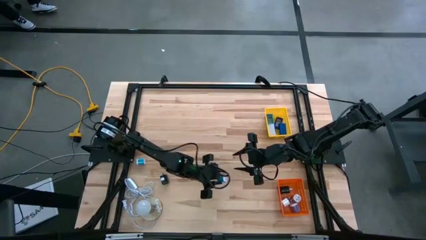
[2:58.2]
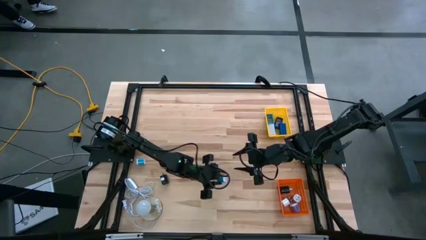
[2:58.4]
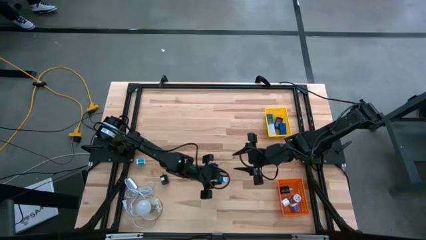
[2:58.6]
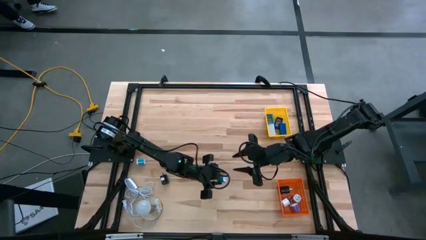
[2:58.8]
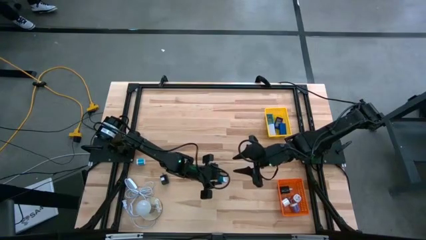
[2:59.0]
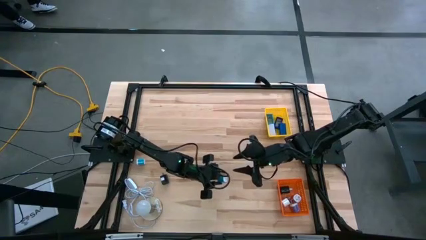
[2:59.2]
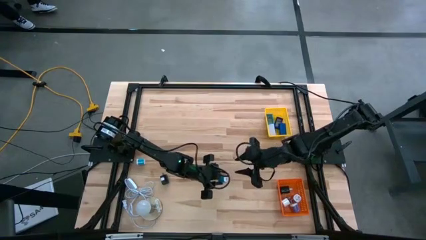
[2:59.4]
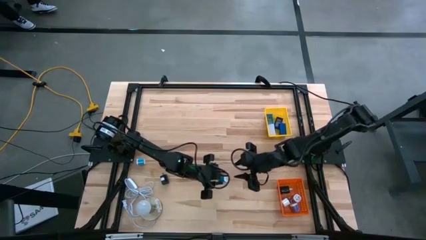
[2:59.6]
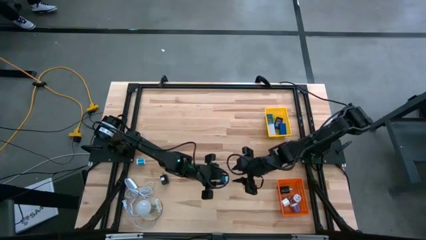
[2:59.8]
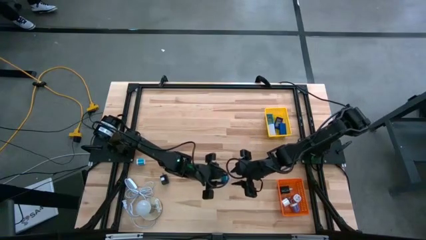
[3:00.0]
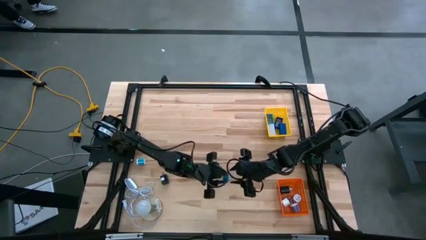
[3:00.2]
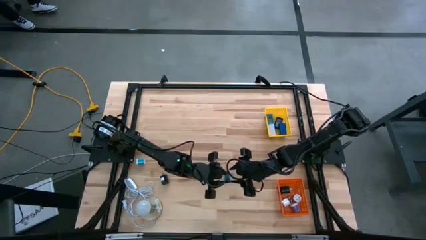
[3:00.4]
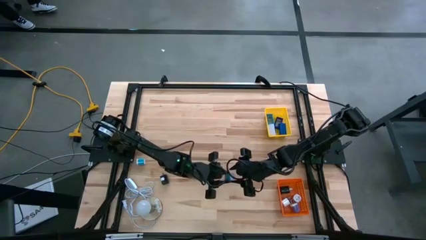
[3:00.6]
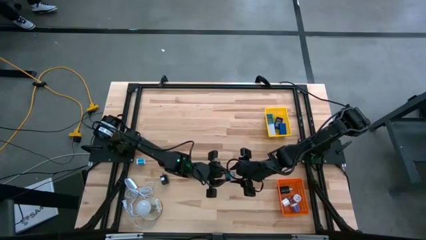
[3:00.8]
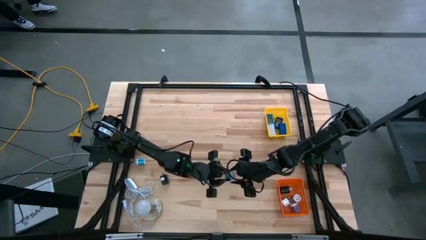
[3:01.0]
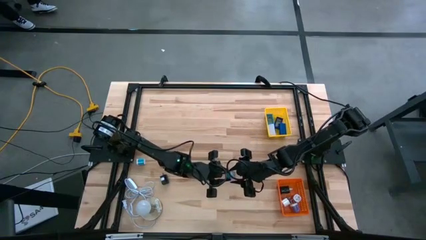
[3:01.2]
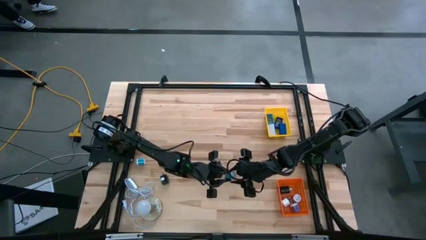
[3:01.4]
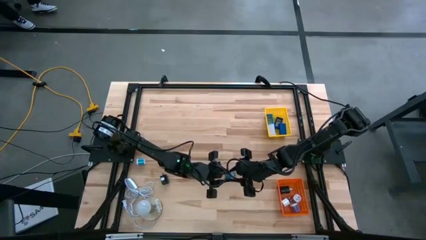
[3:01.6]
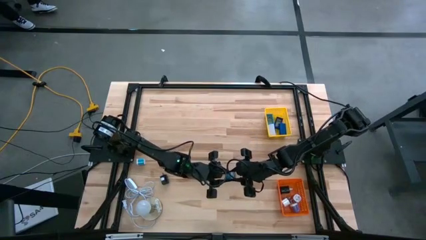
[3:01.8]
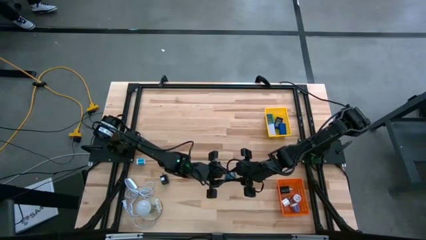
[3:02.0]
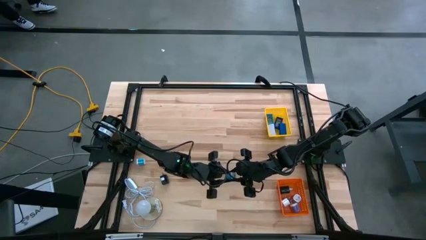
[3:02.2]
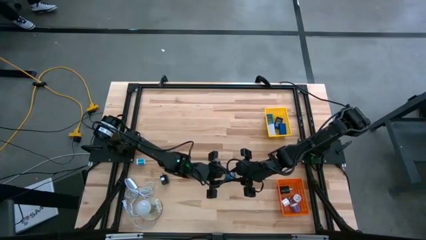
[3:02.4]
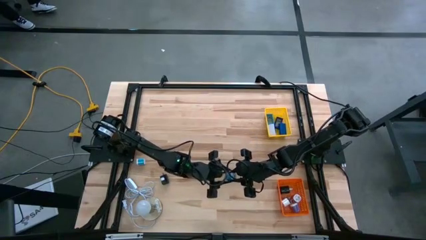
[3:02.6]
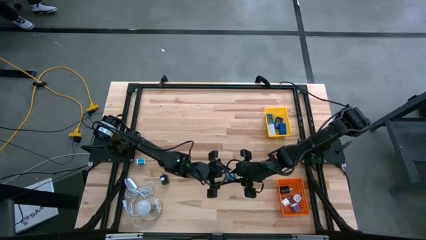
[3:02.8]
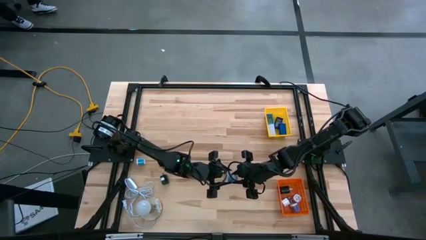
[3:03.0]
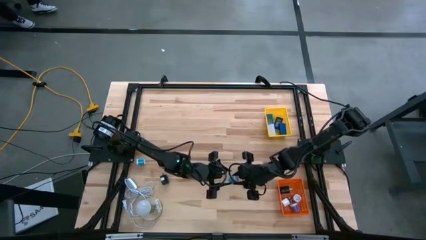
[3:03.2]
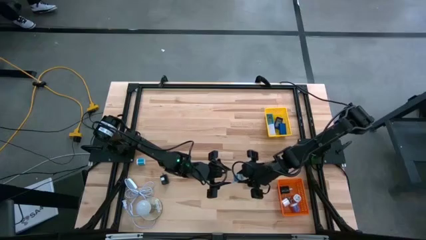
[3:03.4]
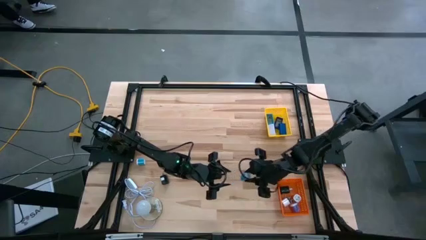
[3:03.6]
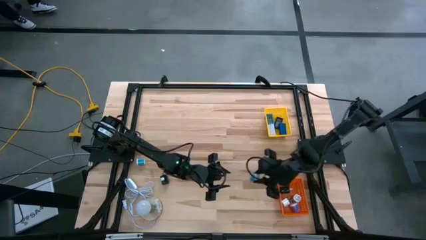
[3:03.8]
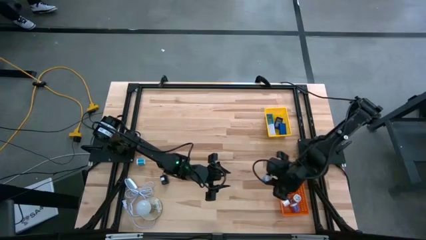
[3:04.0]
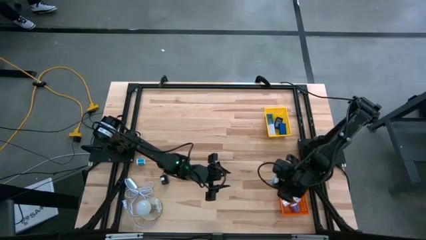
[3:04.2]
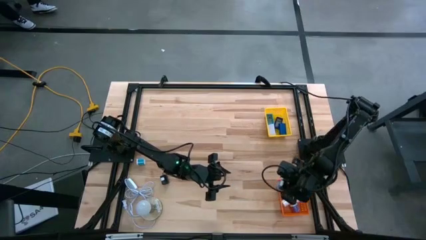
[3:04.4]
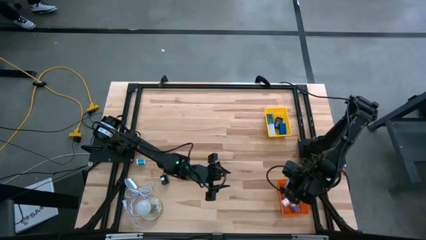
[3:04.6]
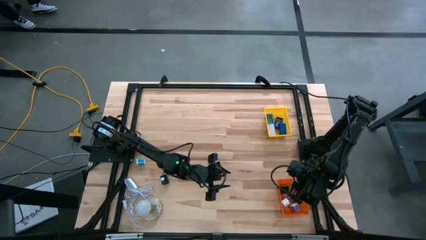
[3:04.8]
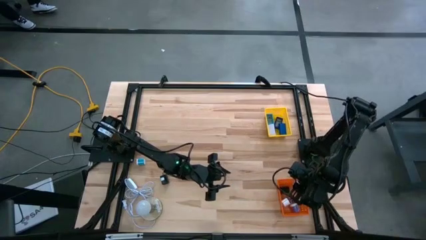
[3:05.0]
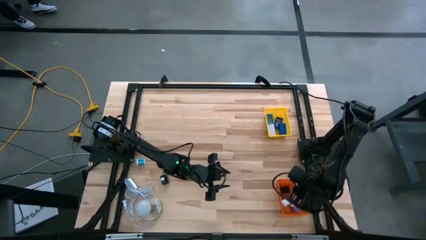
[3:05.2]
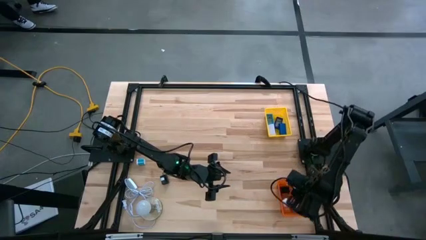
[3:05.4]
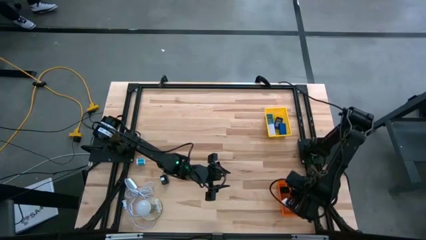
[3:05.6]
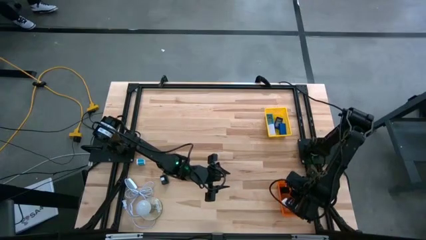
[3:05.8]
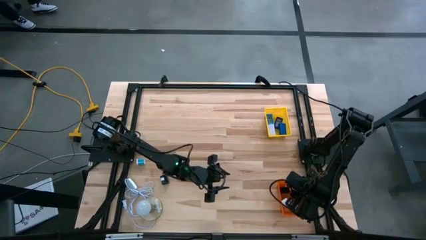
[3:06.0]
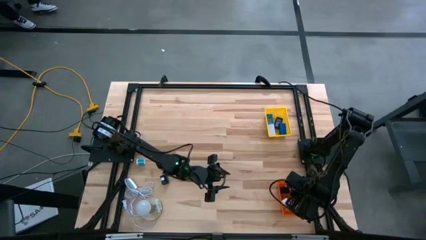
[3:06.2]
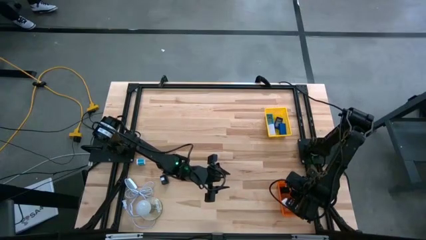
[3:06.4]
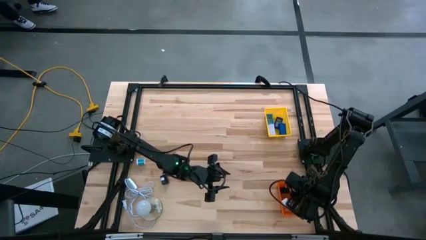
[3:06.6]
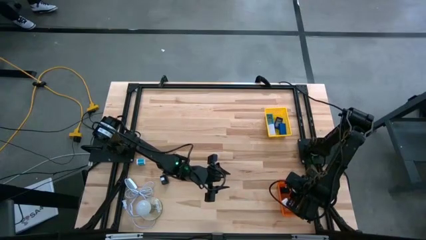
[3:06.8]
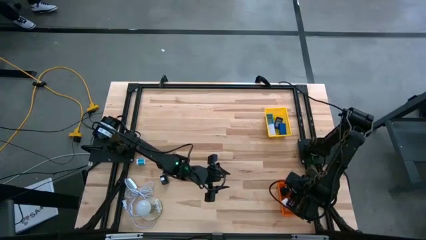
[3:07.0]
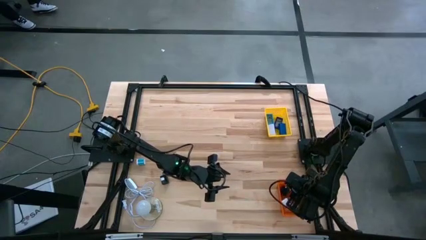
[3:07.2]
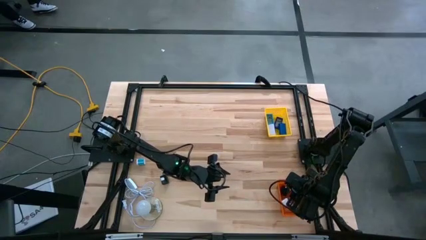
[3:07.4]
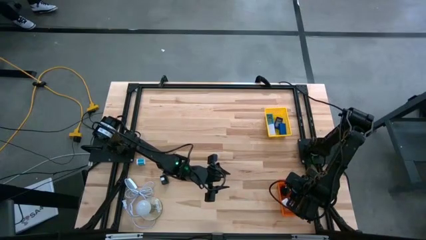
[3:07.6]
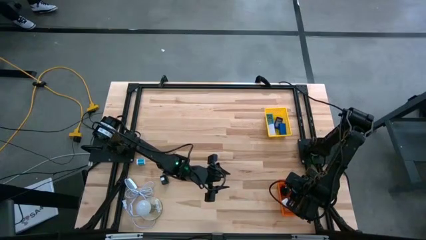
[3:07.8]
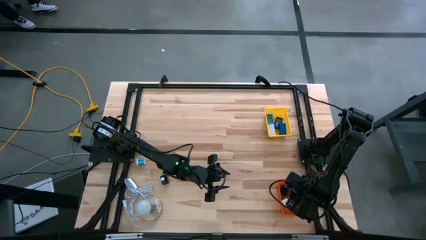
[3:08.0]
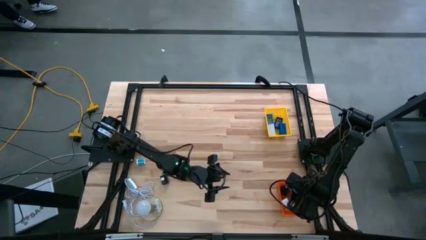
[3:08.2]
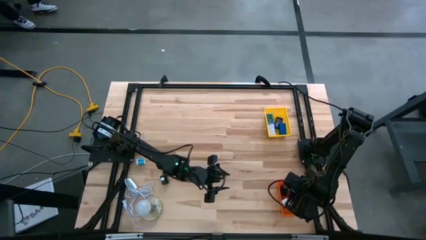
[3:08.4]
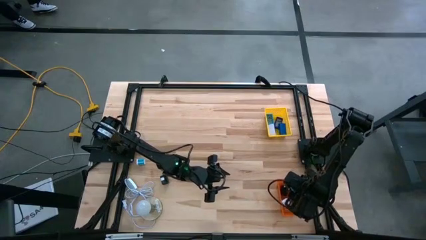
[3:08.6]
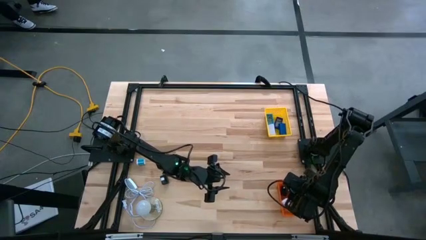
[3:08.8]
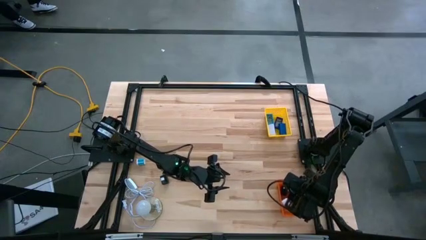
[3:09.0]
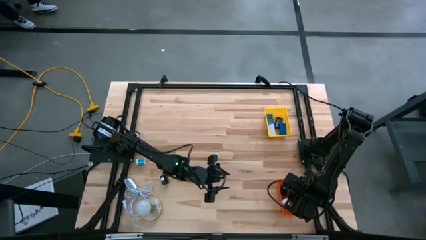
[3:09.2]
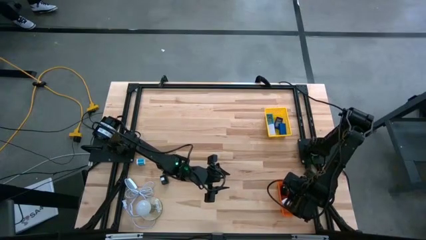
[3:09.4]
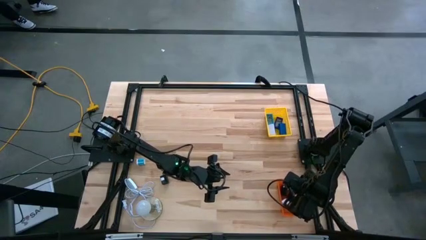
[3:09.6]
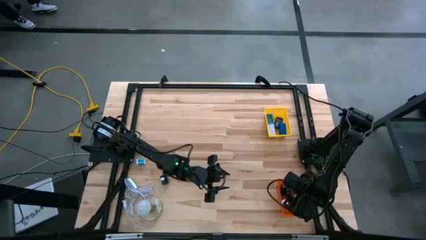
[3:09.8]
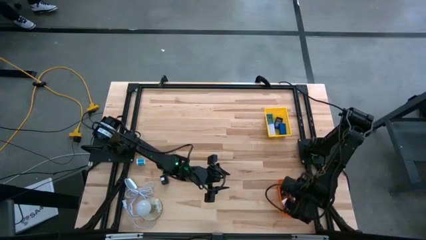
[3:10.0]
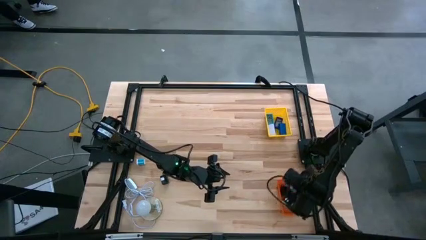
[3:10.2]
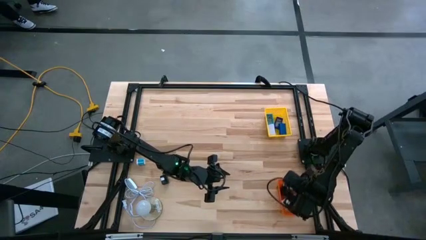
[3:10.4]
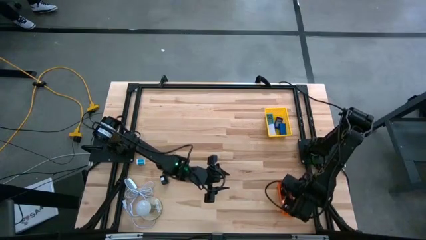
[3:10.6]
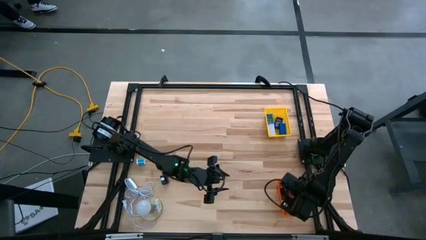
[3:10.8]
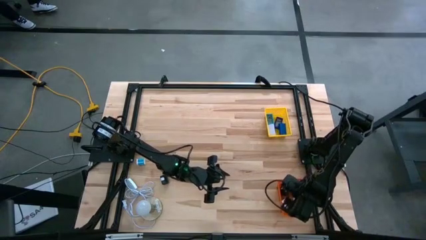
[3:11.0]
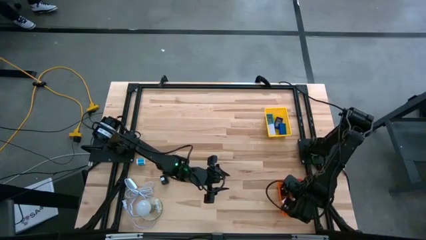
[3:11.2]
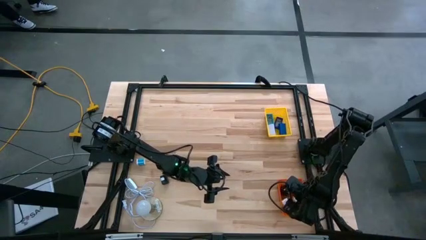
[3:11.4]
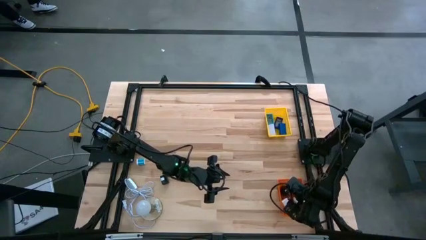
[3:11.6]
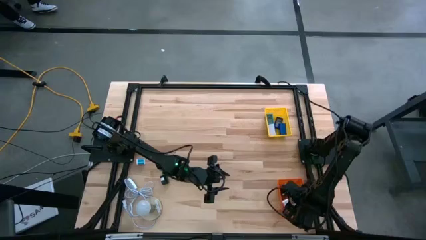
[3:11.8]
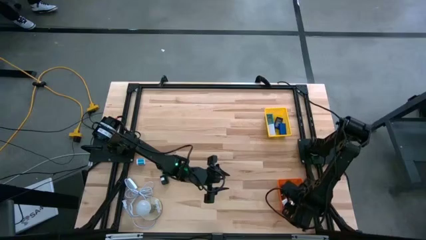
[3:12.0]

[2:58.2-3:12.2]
Task: Pick & Place Office items
Put the right light blue charger adapter into the orange bin

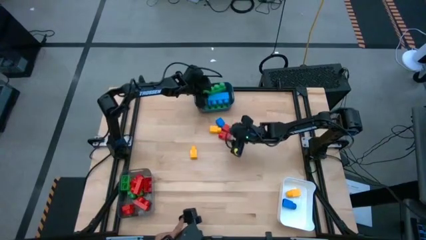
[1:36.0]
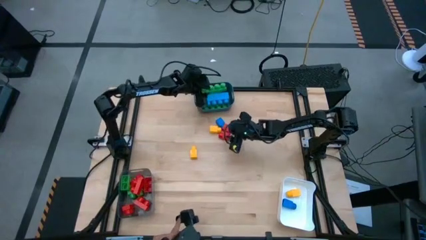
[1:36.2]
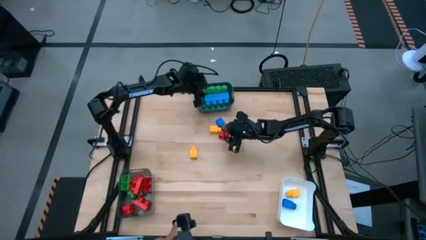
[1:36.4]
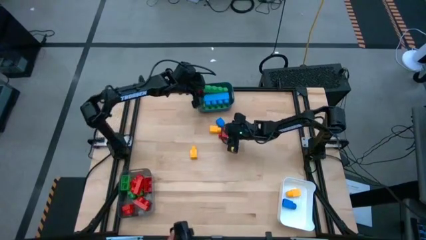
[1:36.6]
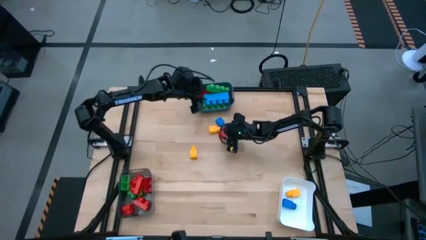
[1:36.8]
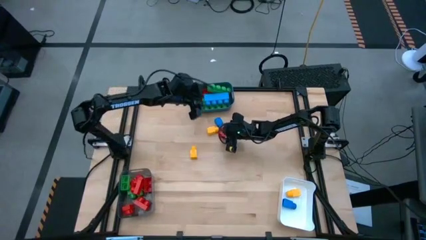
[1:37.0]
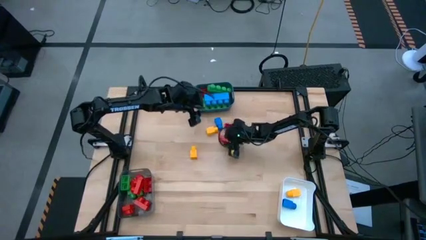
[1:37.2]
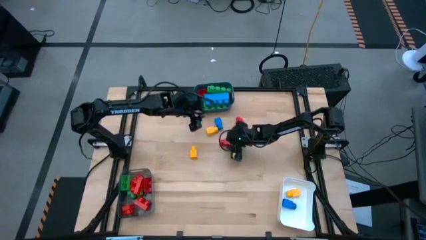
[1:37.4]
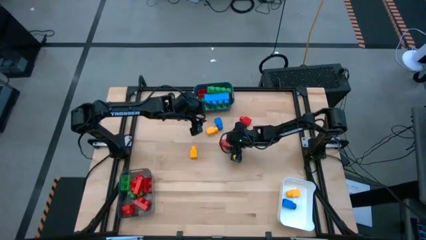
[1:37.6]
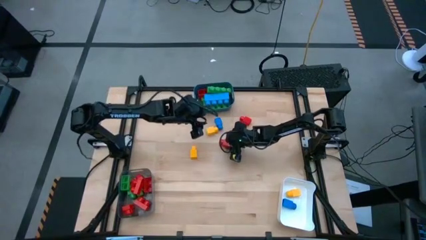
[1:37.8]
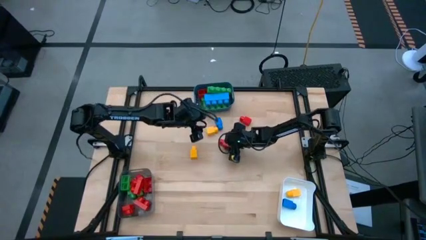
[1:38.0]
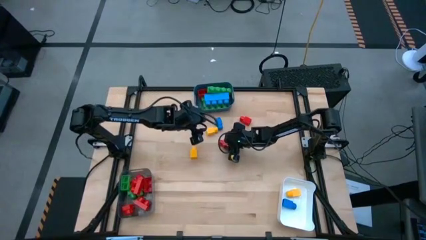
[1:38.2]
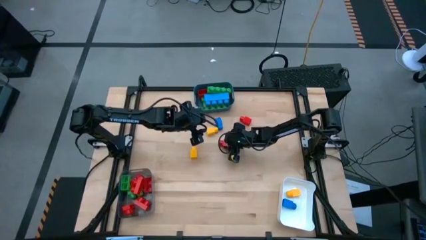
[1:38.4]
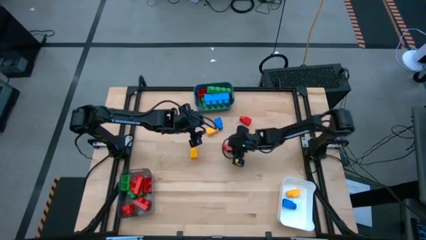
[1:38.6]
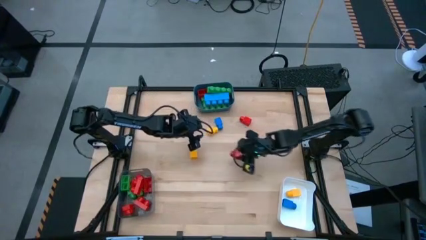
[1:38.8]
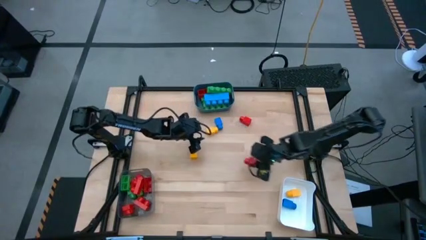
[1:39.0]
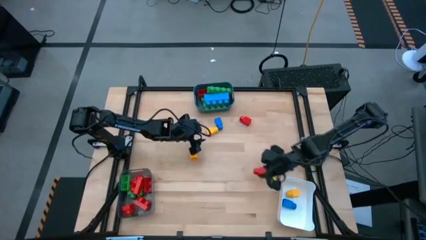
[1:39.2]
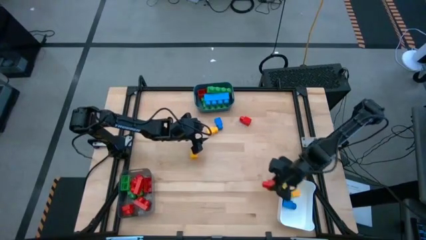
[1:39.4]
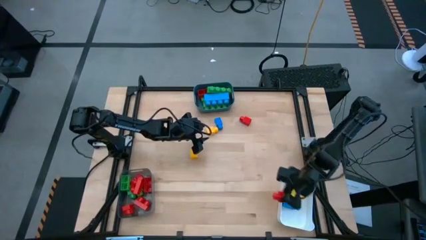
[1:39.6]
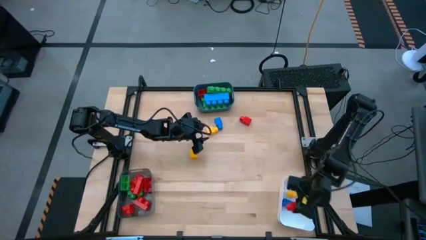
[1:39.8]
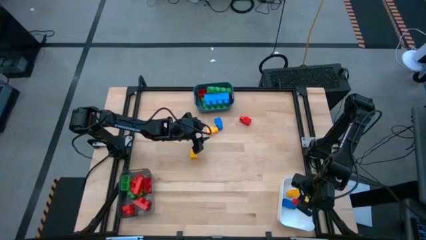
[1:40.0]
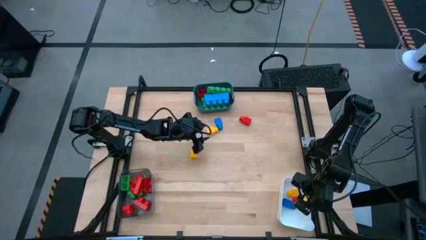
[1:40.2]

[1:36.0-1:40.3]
Task: Sort blocks by size
Put the game piece into the white container
